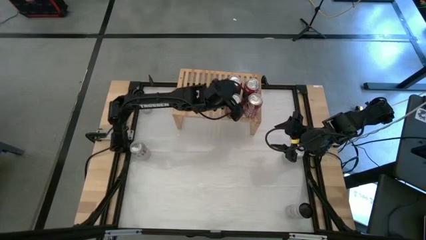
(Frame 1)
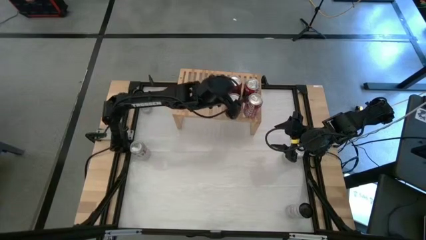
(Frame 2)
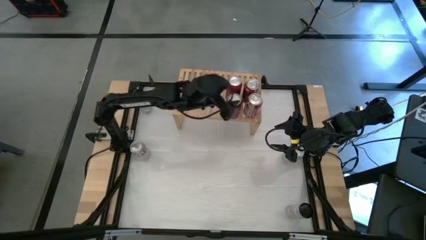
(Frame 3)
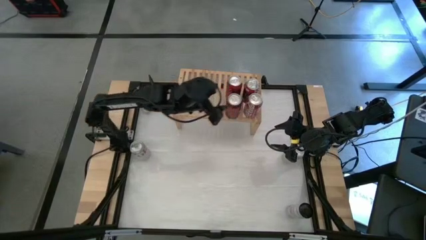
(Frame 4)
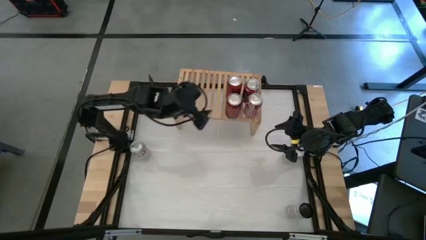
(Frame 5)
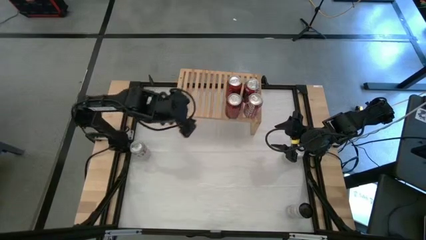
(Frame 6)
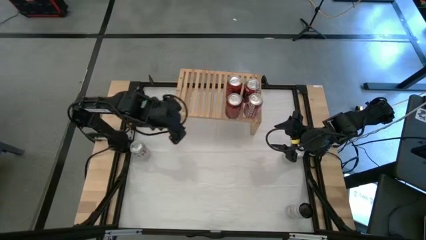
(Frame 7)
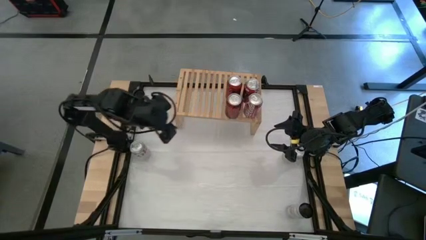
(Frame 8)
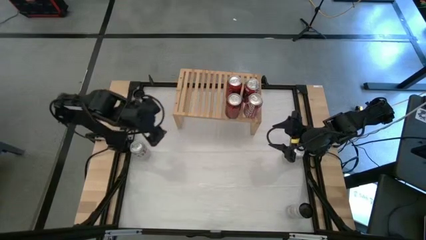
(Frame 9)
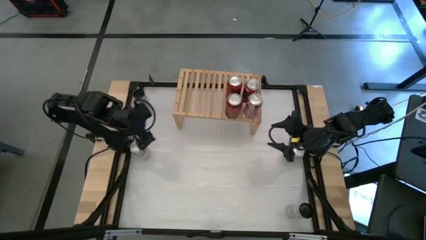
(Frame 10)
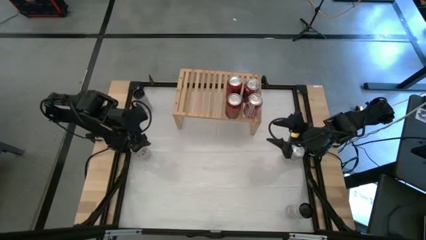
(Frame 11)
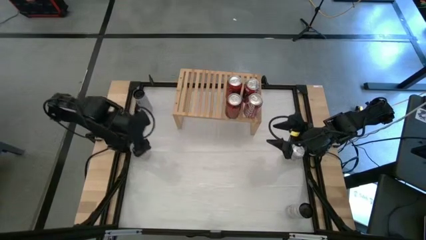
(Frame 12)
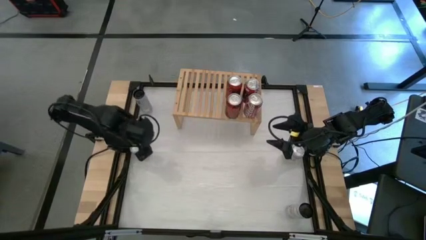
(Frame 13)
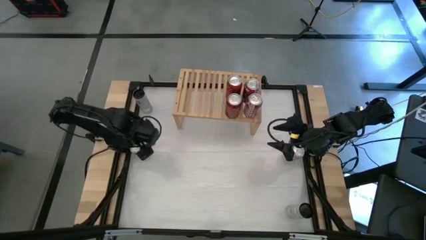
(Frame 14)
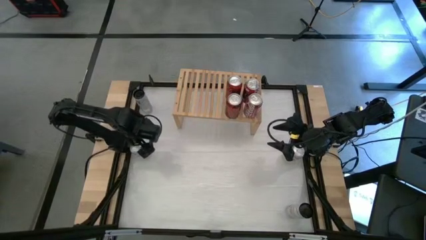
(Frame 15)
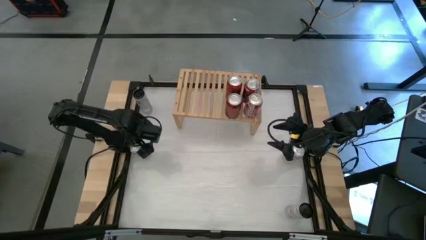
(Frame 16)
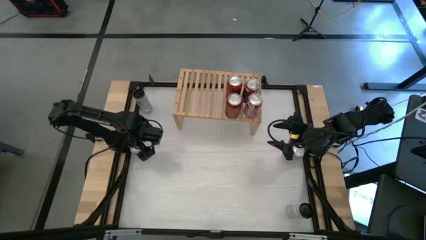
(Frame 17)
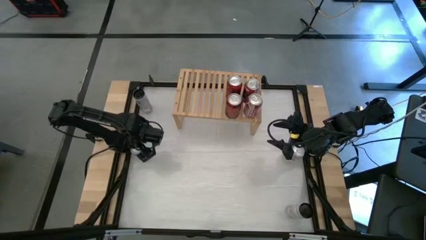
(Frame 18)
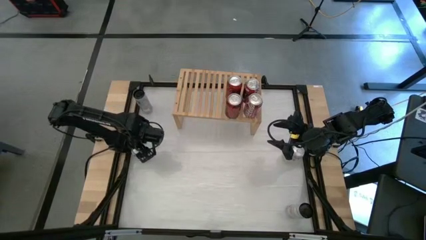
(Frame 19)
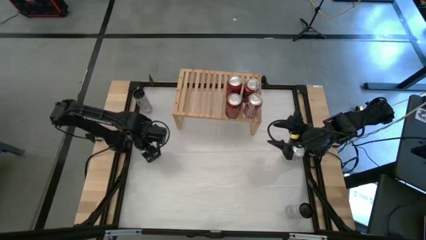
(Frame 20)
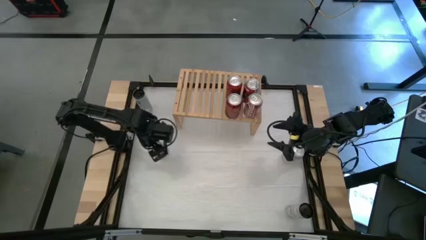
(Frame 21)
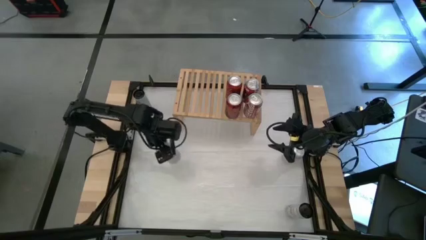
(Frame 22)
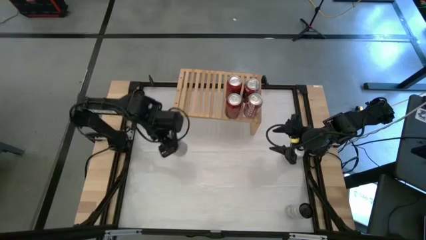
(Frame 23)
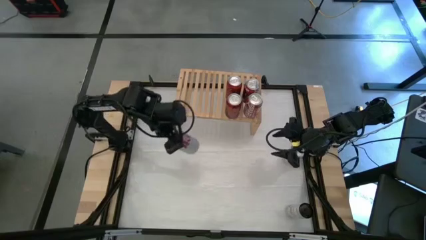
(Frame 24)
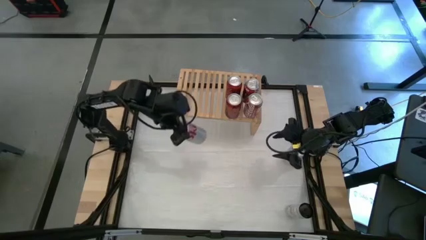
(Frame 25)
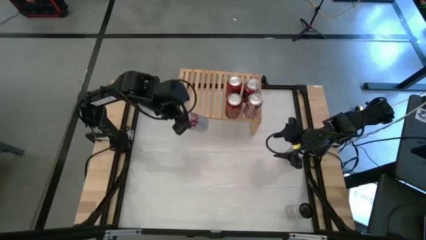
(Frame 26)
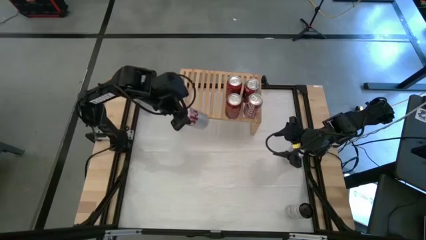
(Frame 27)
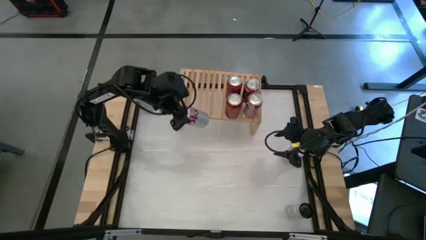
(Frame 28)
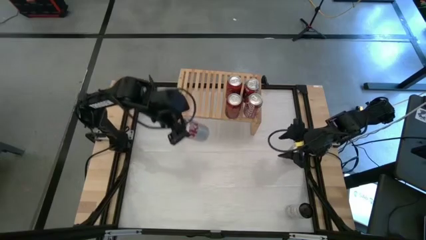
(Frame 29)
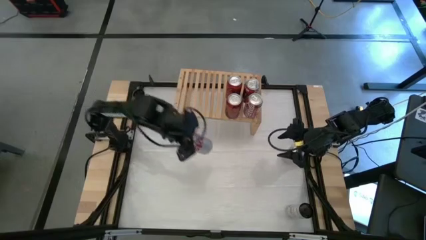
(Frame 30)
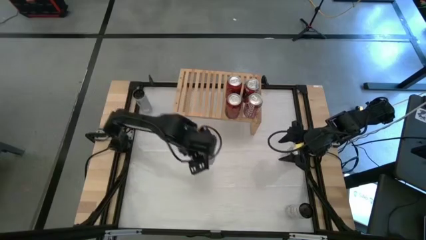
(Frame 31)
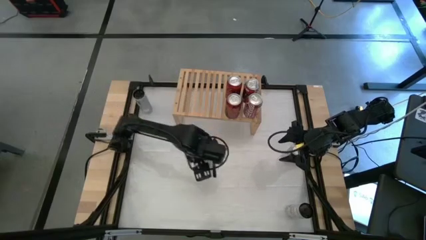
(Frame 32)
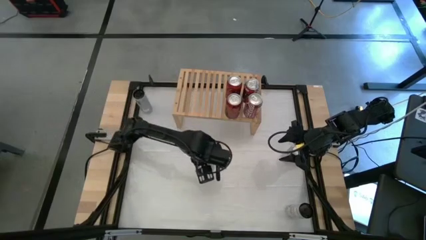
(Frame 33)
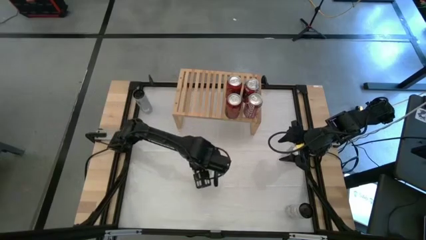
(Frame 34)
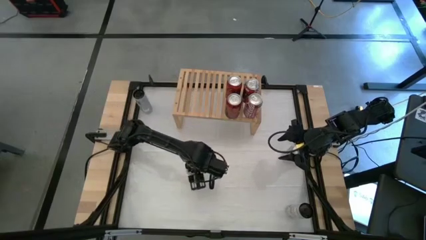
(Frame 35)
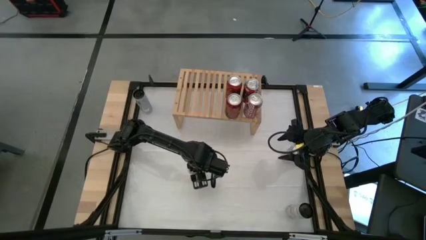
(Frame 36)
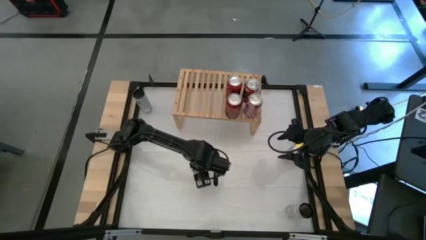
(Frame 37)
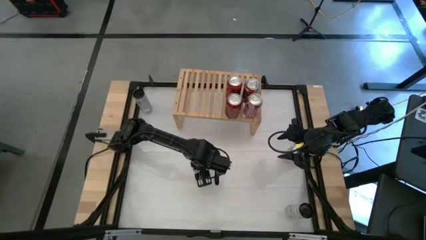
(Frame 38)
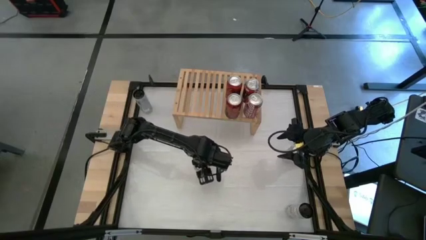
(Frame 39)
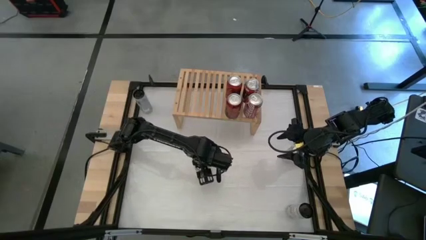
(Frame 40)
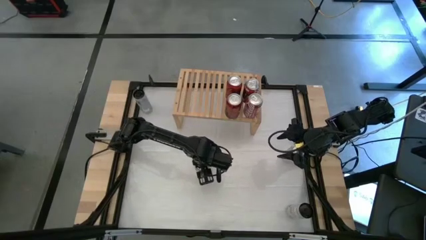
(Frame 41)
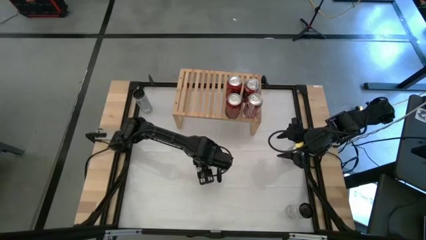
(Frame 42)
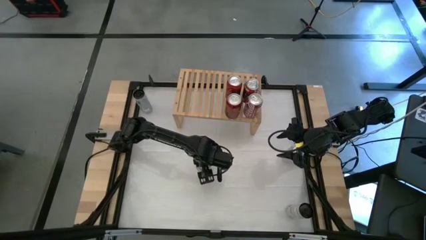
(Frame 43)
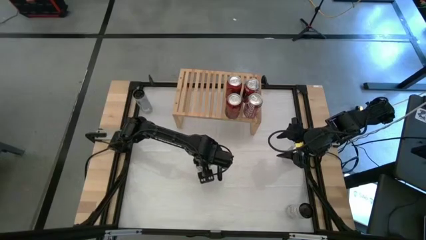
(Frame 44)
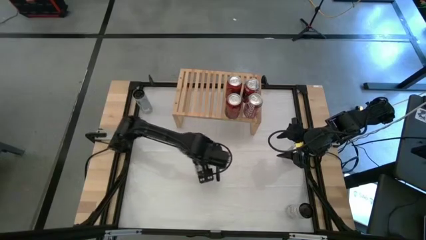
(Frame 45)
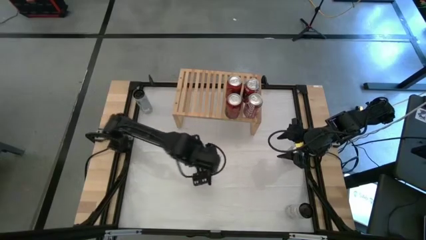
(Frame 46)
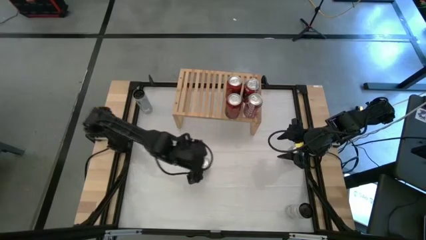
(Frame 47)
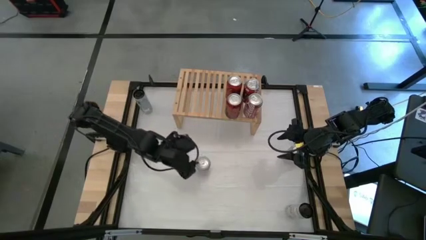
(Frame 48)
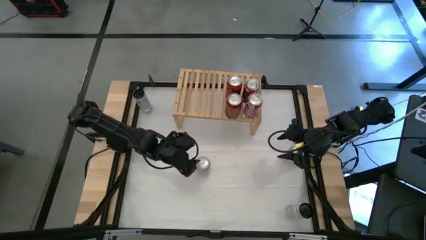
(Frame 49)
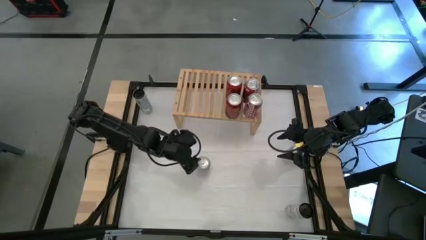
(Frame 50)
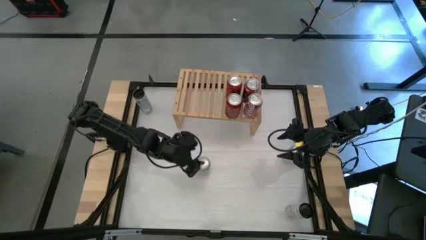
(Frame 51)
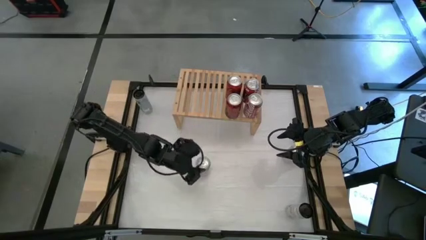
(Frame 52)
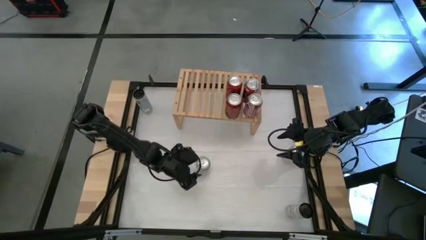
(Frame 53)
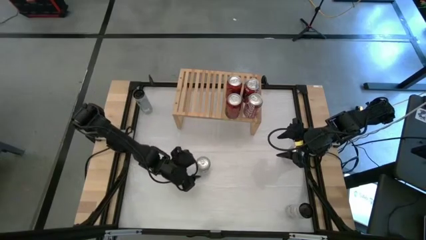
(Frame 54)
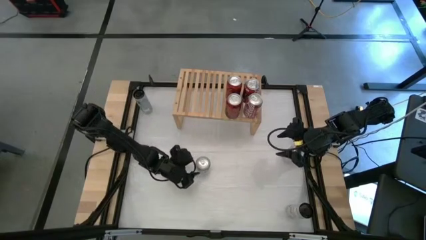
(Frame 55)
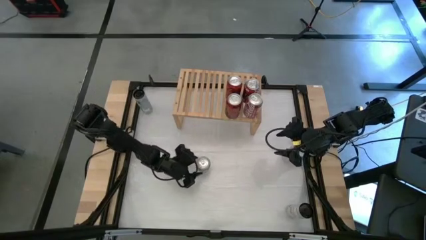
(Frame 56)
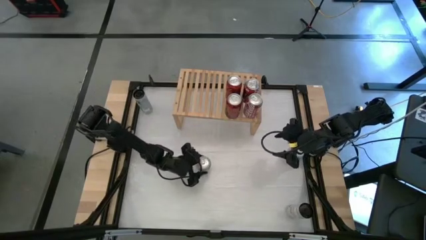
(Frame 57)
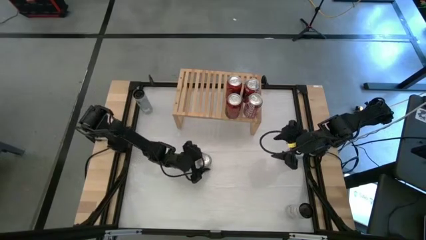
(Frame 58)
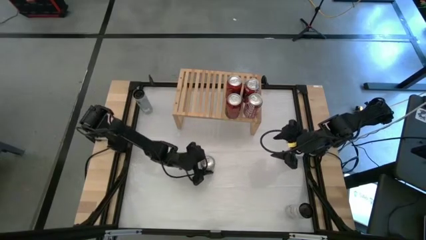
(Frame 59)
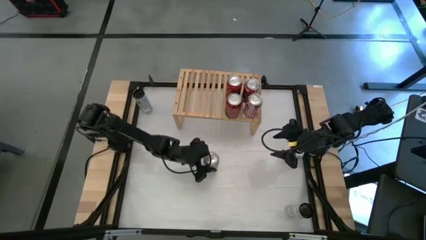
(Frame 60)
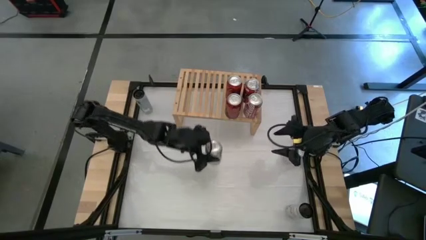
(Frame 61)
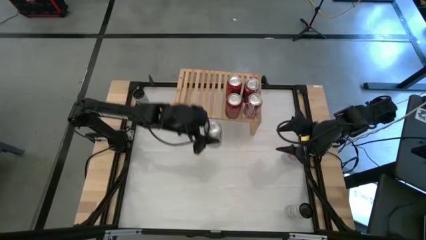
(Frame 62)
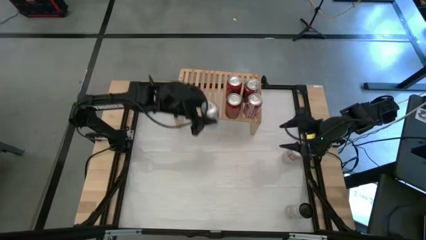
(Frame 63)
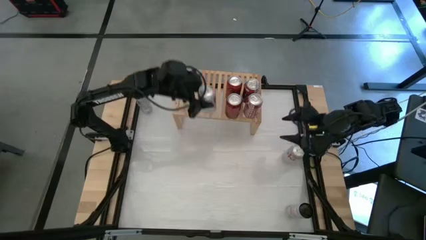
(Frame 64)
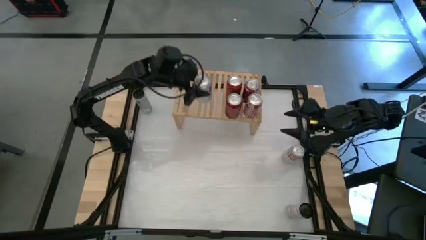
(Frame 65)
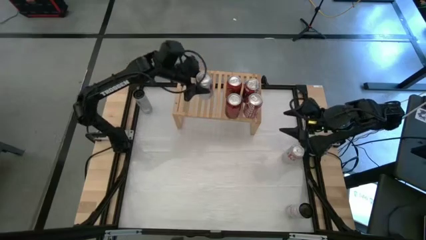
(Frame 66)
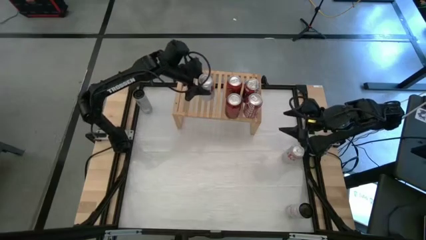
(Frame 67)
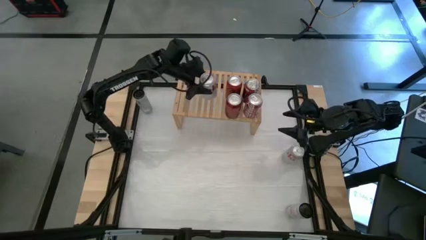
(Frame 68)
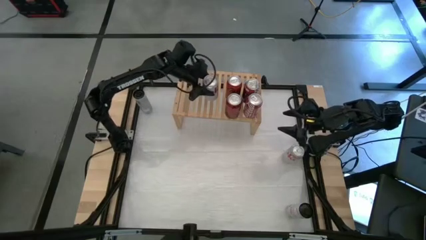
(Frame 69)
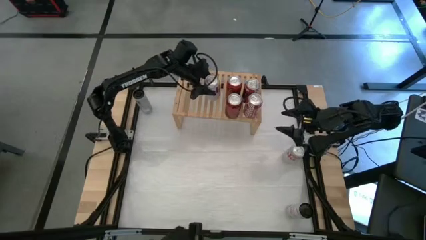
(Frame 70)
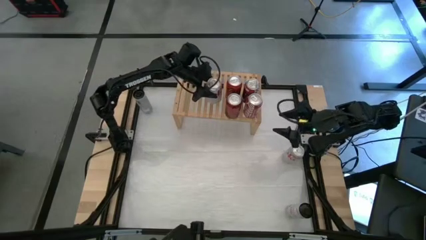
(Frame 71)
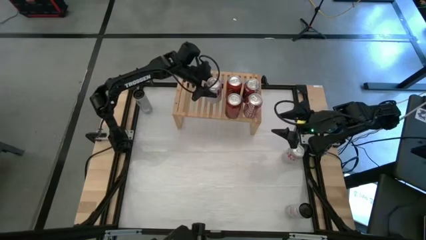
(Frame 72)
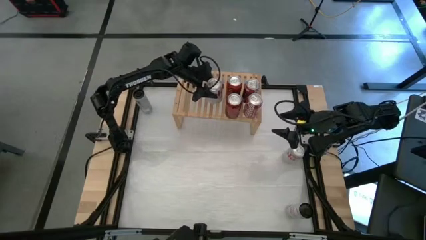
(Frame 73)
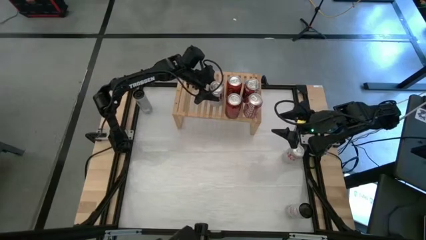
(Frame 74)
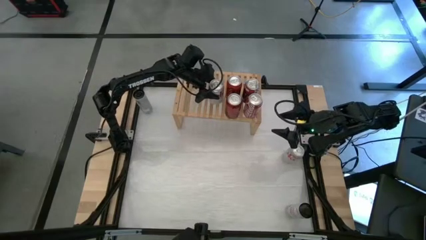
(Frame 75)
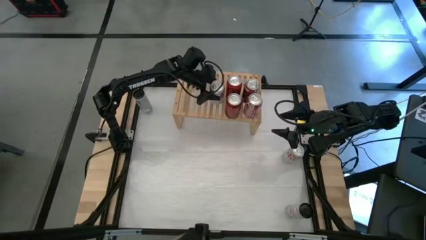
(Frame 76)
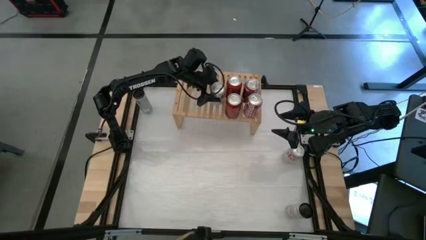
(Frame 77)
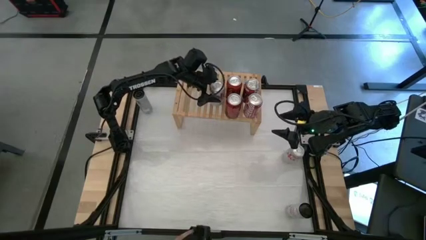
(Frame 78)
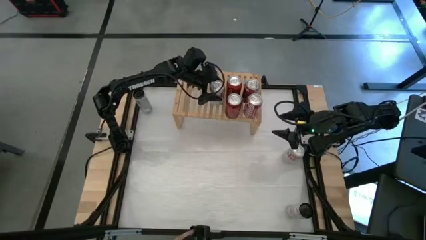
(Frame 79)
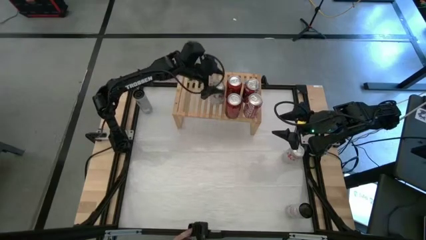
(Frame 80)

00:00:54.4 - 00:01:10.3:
Task: Place canned beverage on shelf
Put the left silver soda can on the shelf
